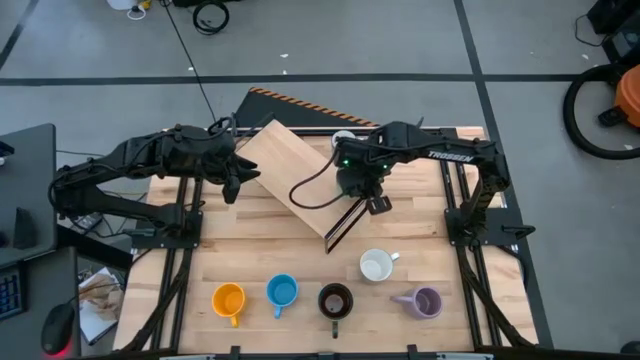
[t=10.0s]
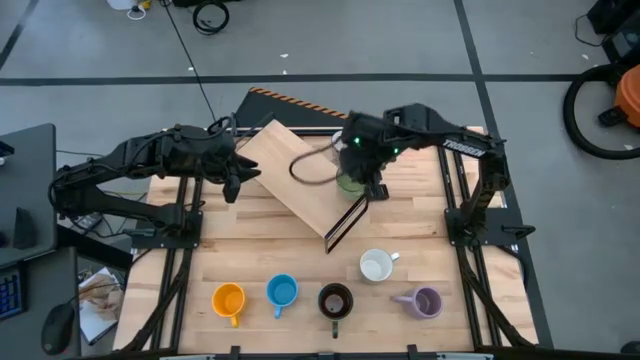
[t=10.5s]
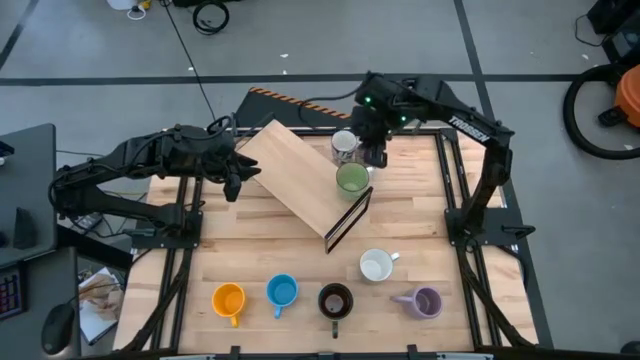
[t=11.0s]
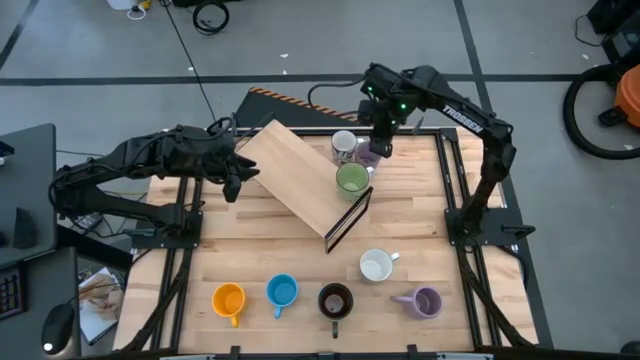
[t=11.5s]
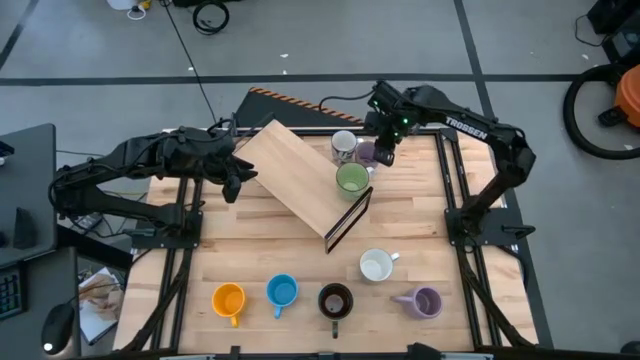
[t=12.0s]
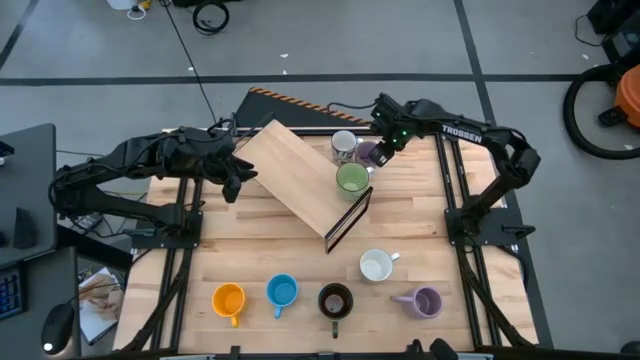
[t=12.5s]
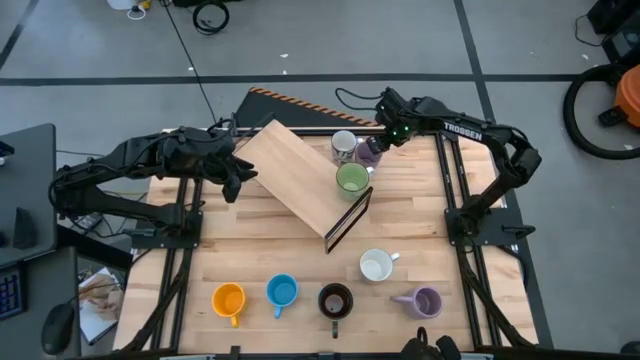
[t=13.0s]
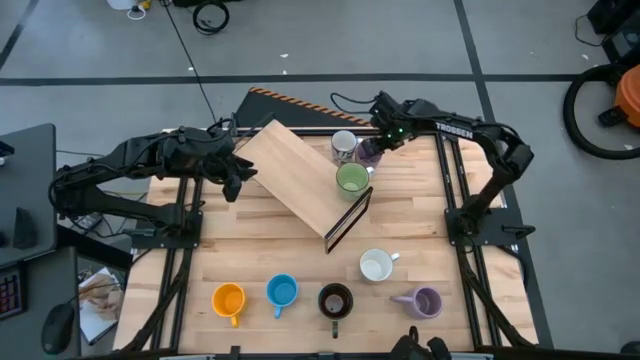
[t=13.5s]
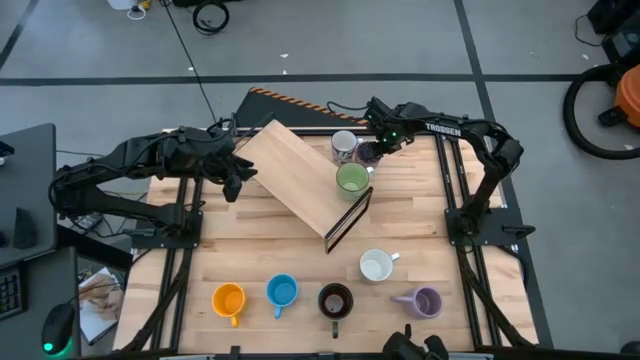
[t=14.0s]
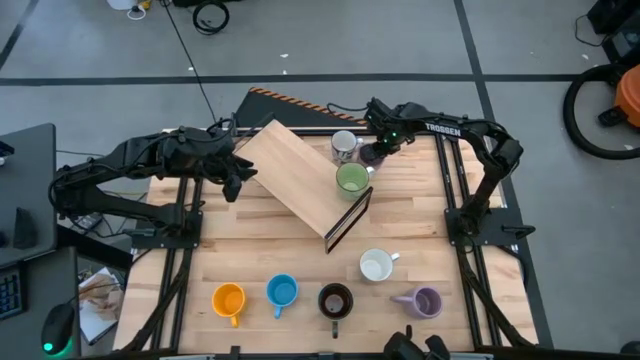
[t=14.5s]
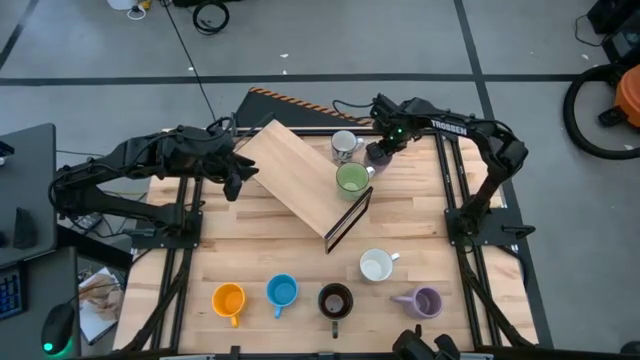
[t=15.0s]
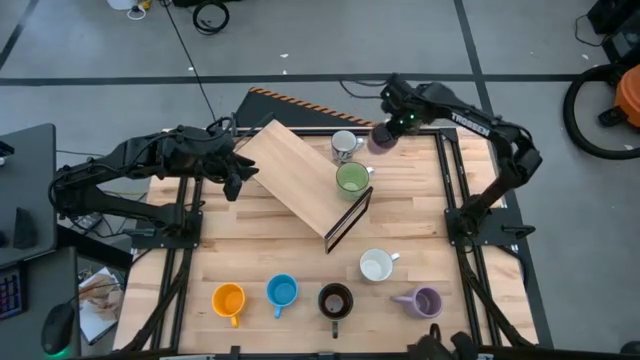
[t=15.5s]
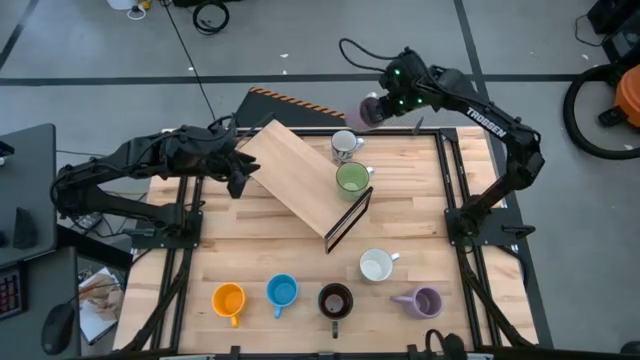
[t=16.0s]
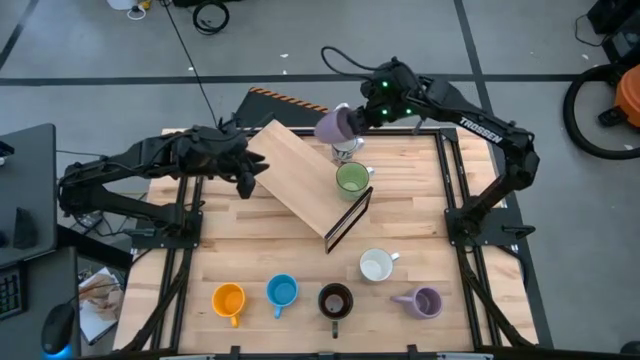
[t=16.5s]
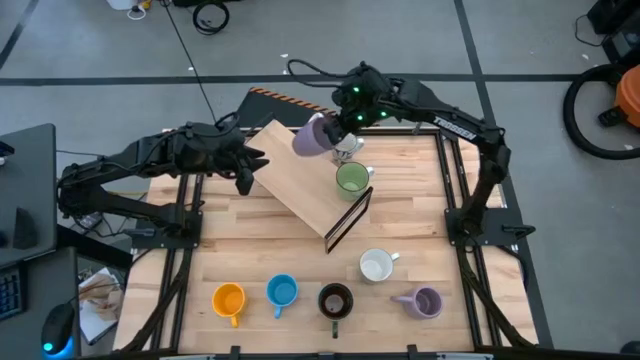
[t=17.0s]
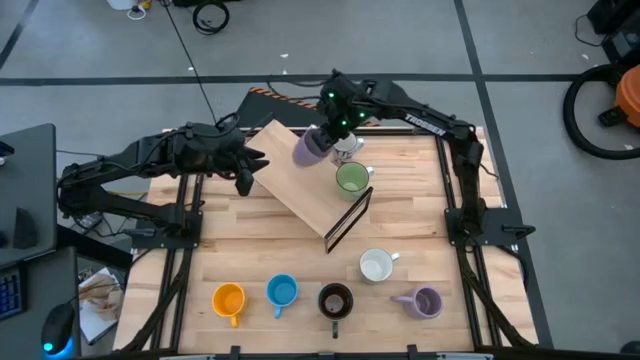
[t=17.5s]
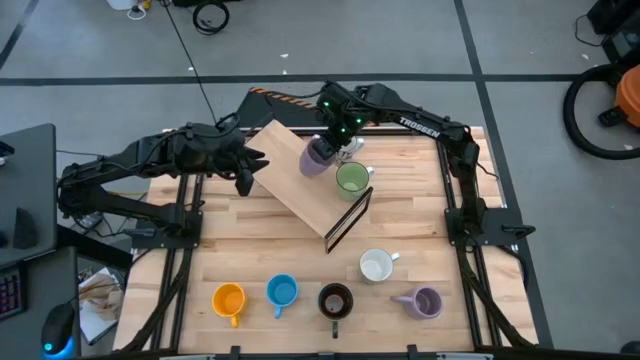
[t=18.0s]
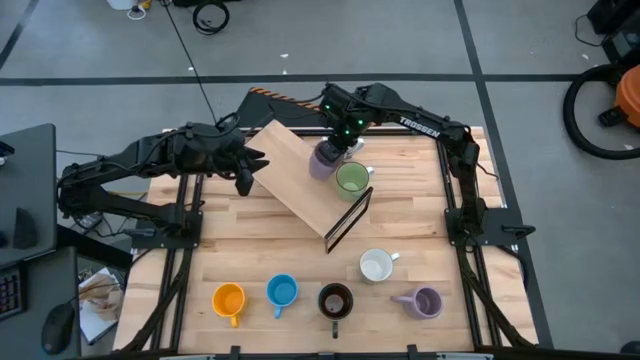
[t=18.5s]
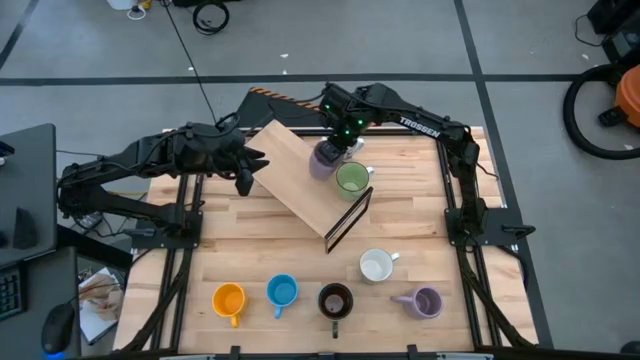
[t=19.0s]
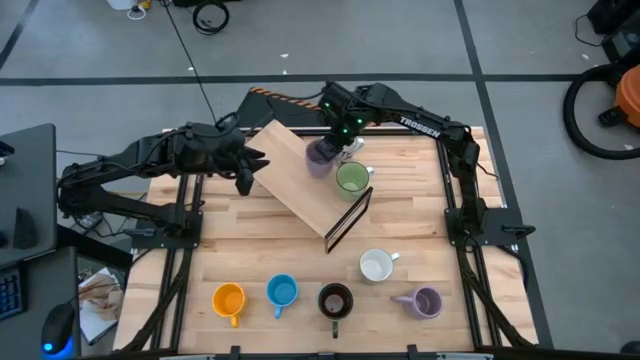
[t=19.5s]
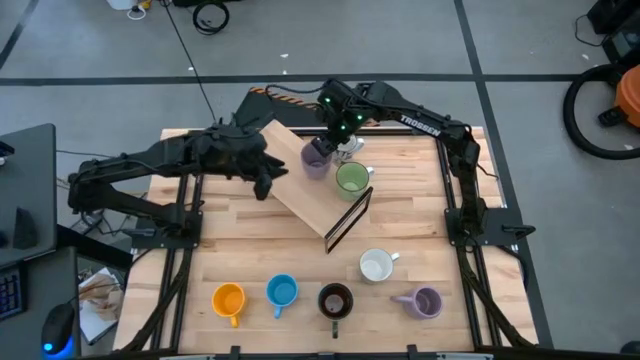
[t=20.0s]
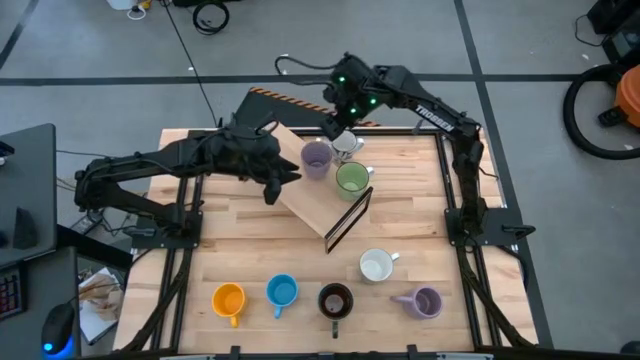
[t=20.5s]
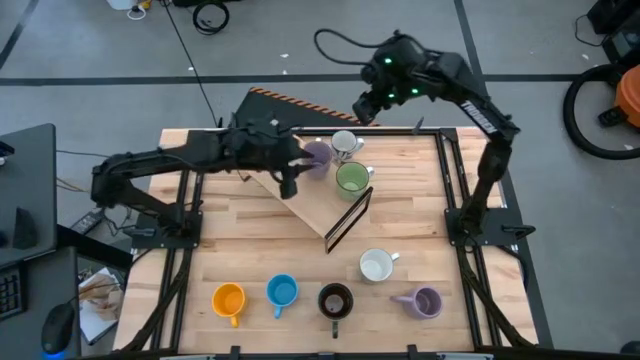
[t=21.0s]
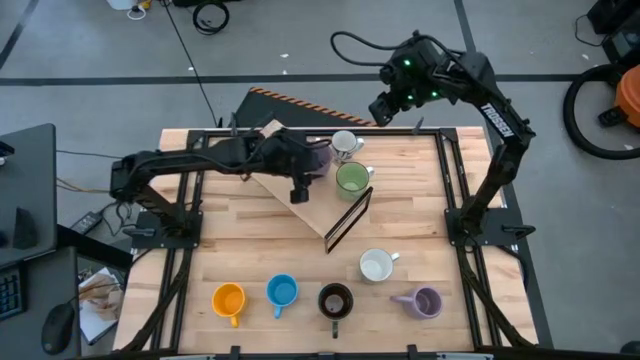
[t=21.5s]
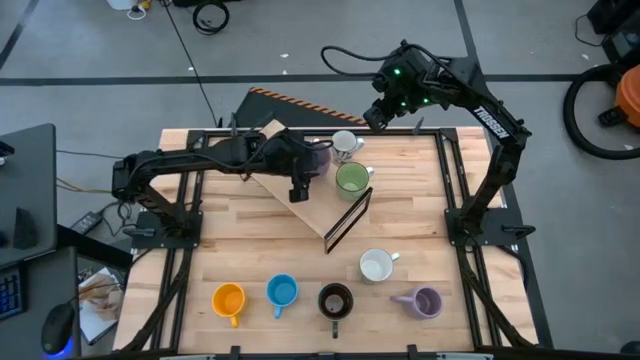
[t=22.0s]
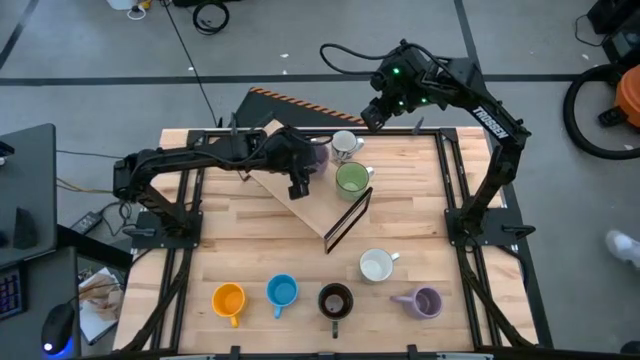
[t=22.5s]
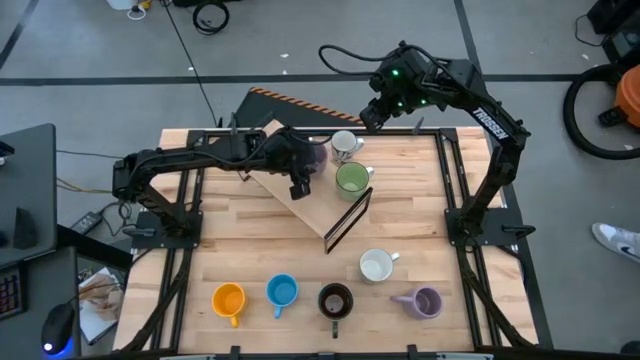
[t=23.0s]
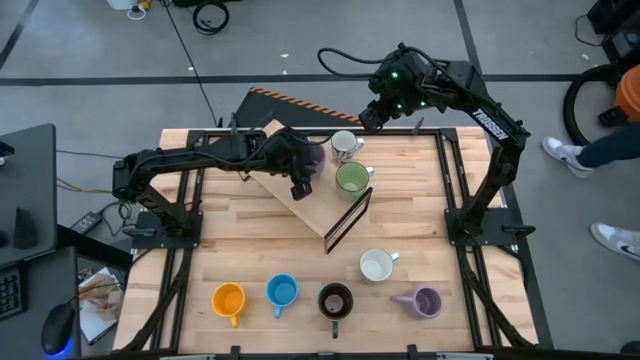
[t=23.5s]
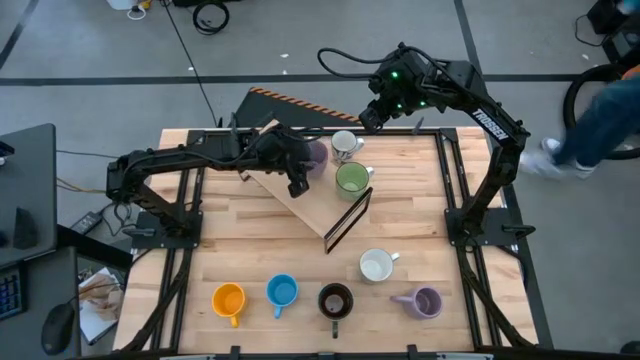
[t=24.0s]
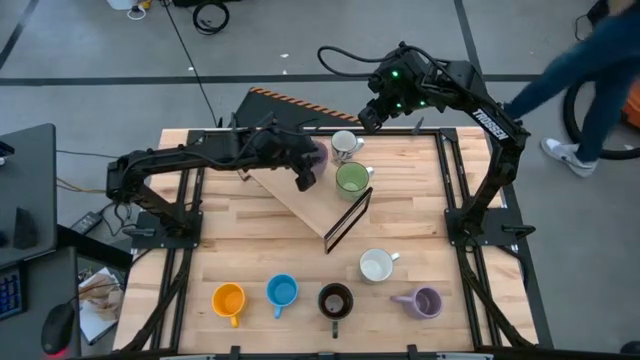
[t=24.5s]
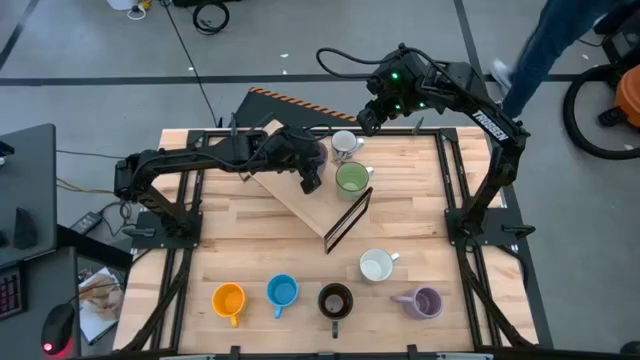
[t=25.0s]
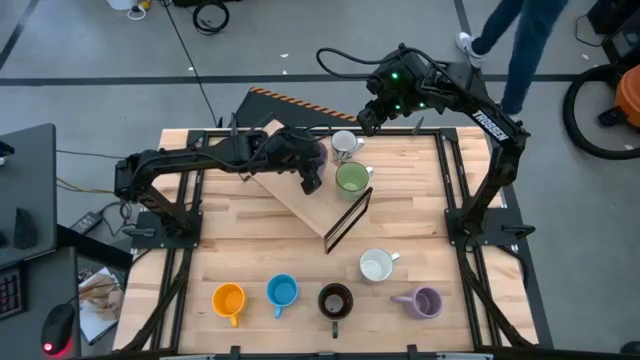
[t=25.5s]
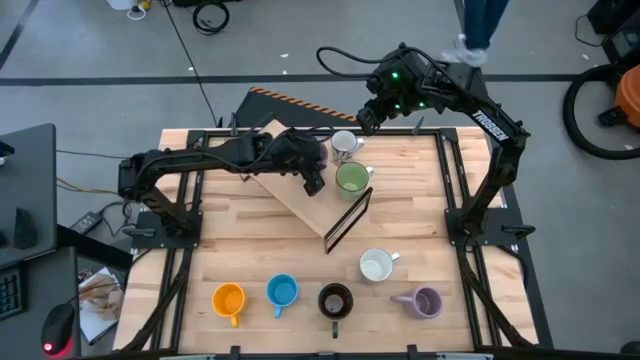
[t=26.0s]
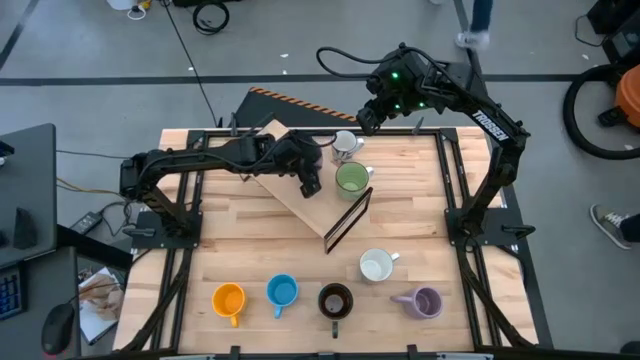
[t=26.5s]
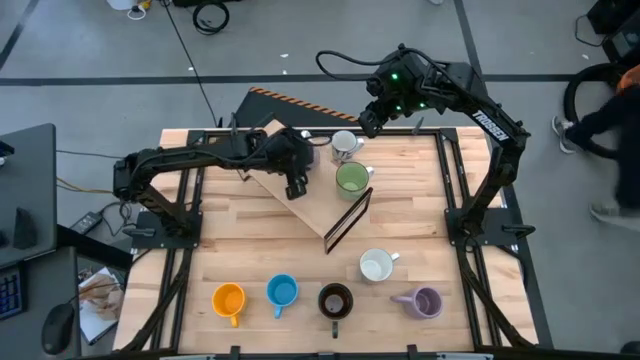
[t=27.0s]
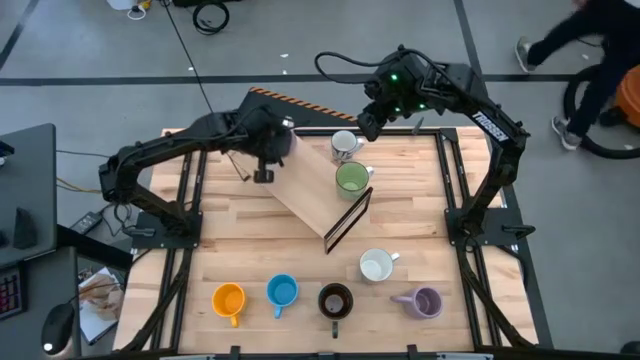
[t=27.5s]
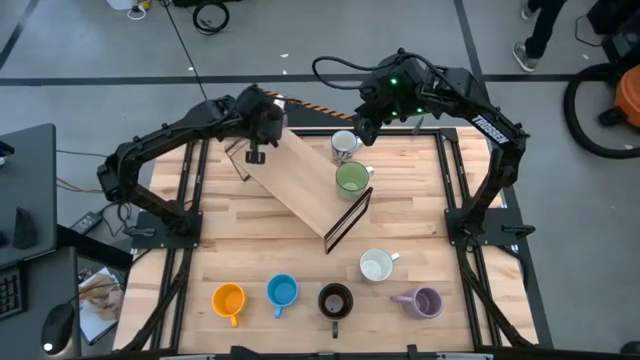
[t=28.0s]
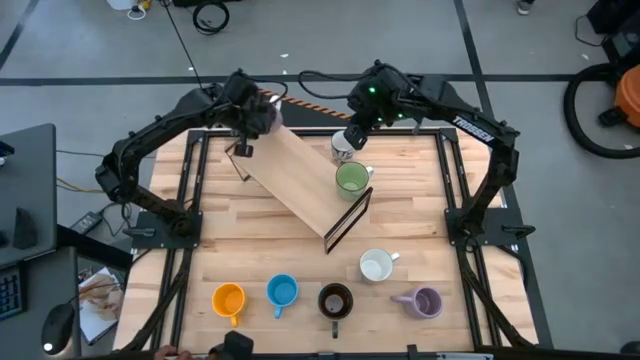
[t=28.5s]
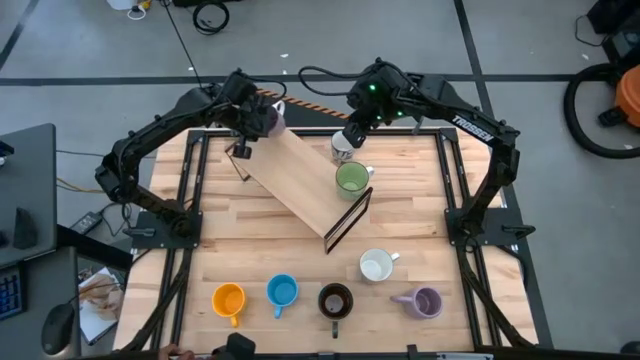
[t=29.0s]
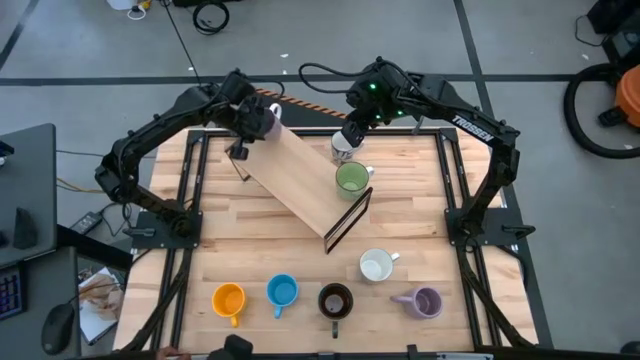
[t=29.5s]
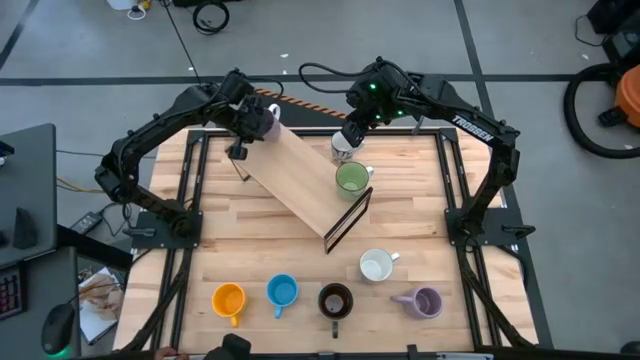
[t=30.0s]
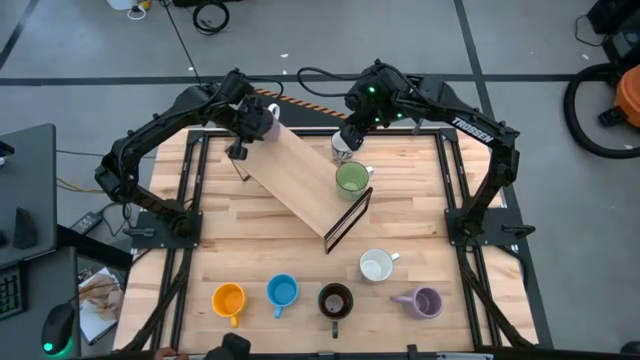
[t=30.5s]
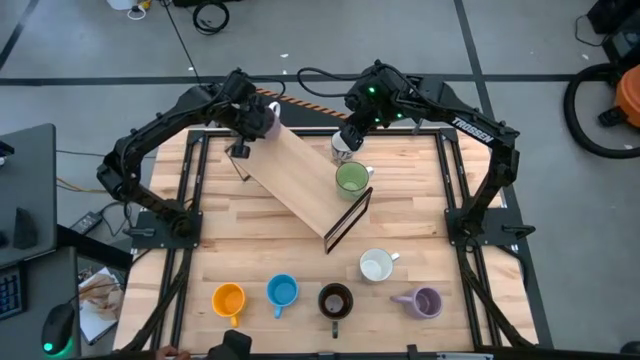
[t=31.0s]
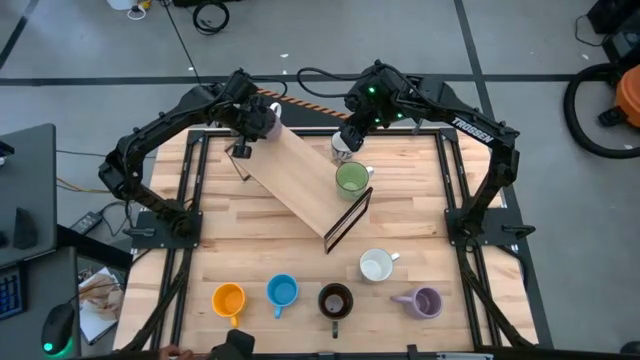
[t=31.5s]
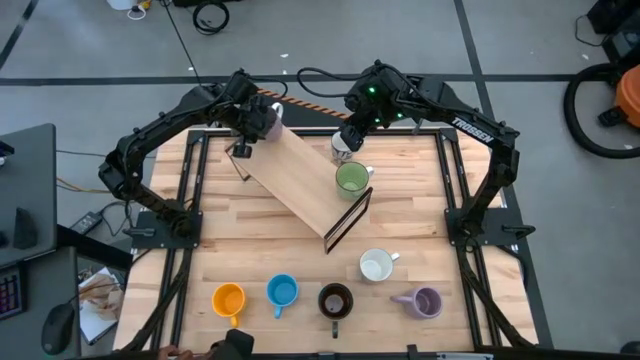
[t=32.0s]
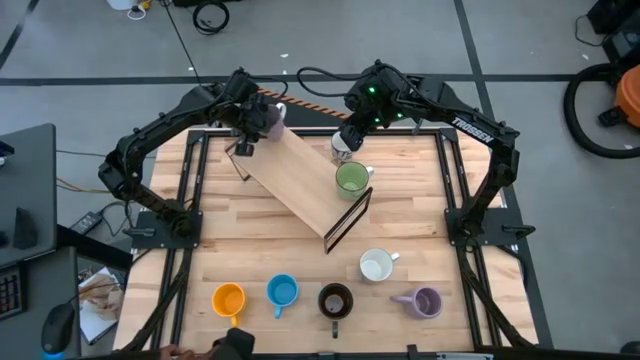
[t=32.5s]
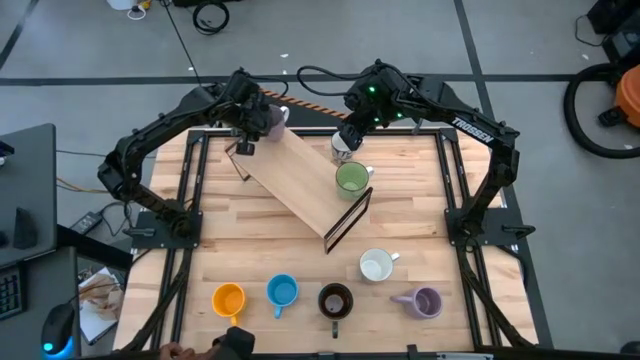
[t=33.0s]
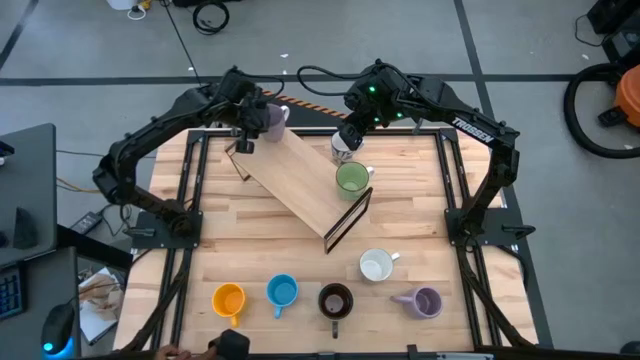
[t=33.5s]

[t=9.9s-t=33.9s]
Task: Place coffee mugs
Put the top violet mug on the shelf
